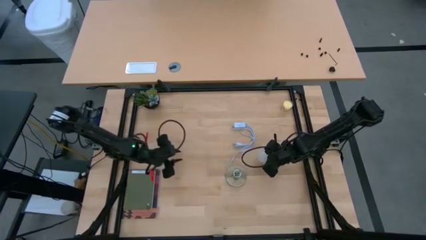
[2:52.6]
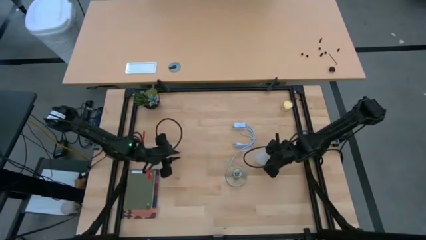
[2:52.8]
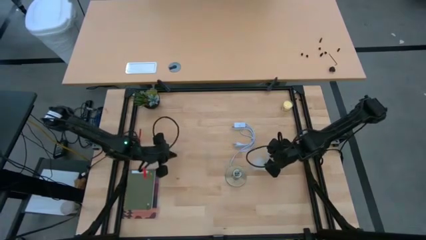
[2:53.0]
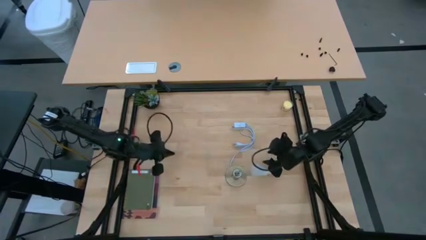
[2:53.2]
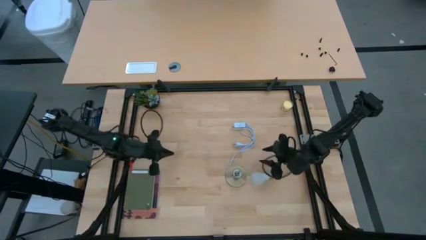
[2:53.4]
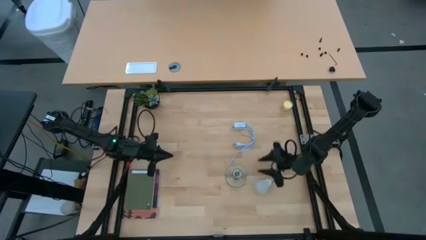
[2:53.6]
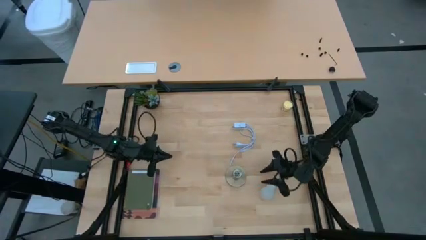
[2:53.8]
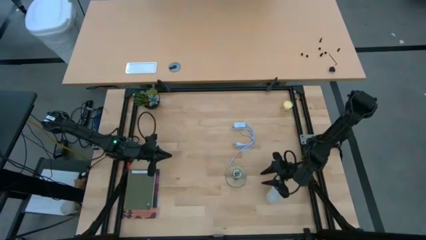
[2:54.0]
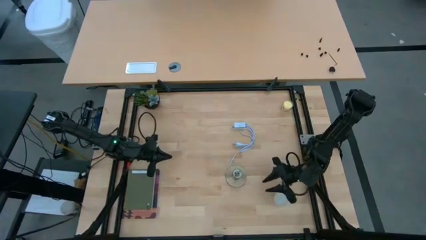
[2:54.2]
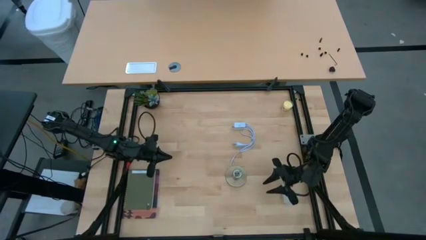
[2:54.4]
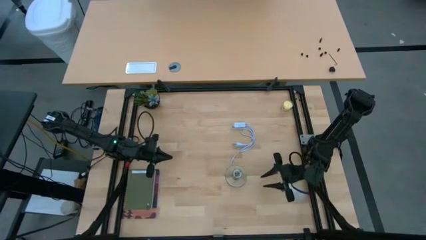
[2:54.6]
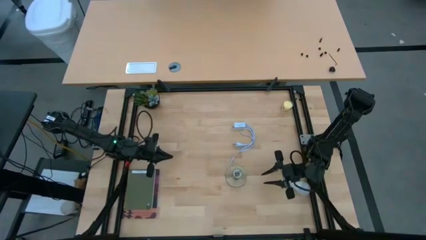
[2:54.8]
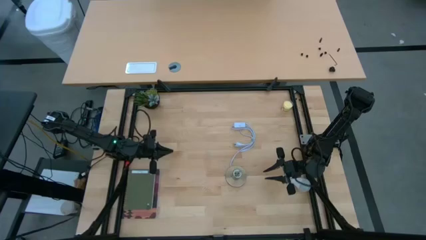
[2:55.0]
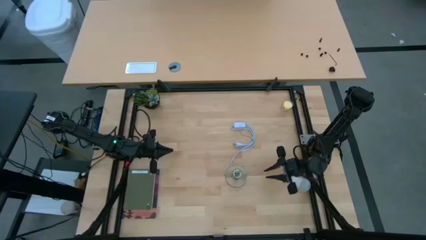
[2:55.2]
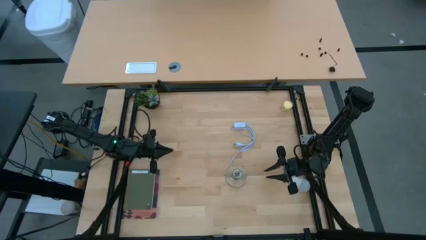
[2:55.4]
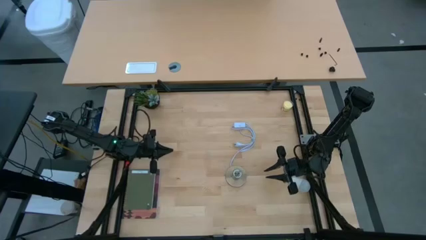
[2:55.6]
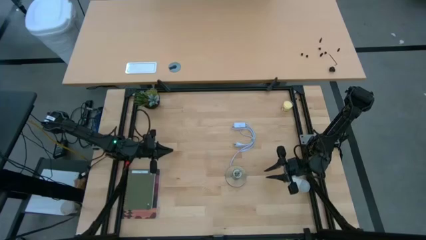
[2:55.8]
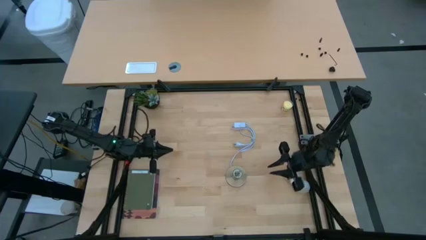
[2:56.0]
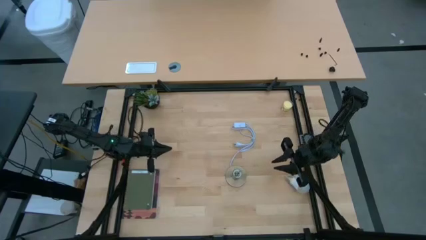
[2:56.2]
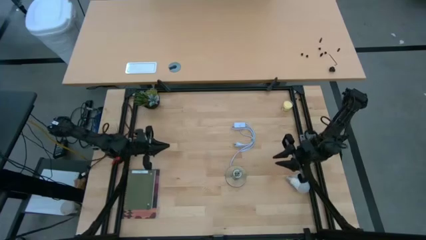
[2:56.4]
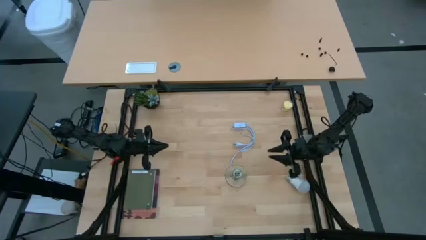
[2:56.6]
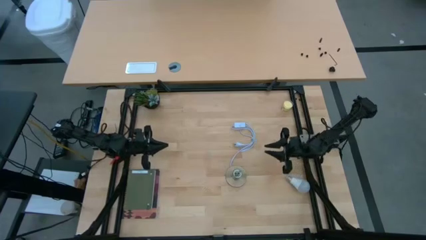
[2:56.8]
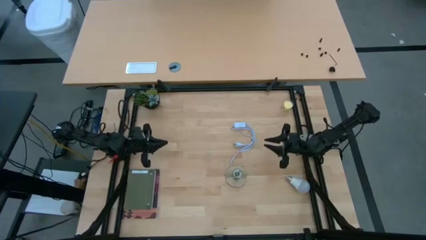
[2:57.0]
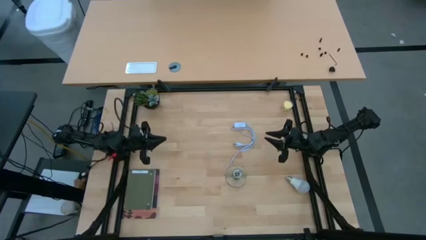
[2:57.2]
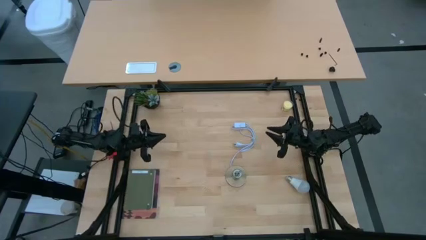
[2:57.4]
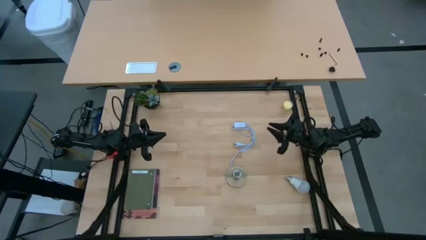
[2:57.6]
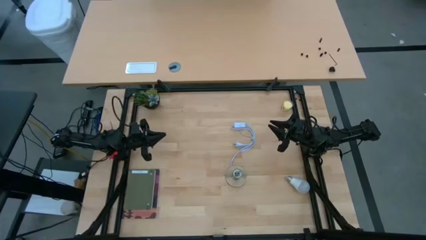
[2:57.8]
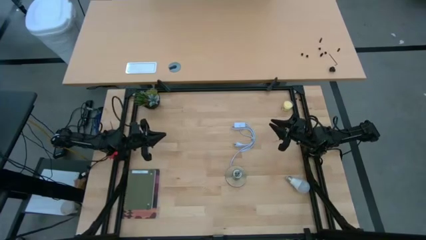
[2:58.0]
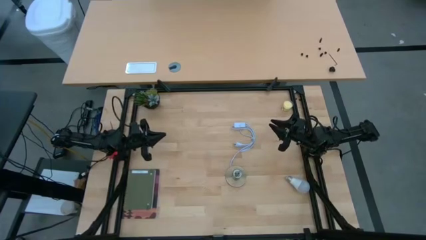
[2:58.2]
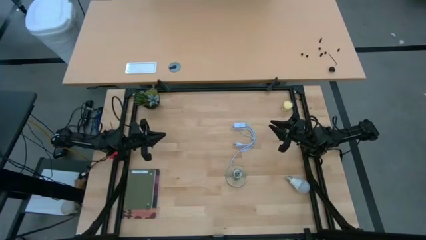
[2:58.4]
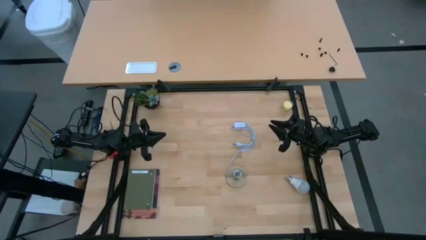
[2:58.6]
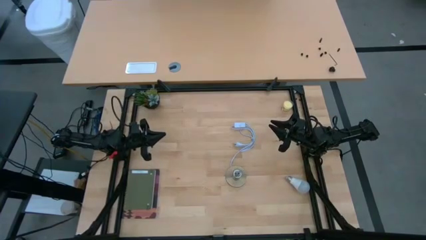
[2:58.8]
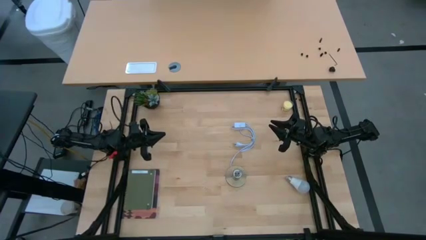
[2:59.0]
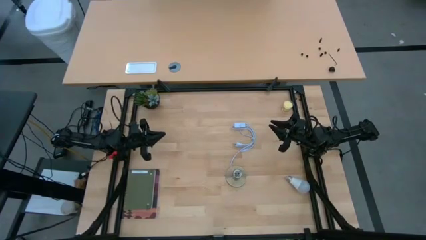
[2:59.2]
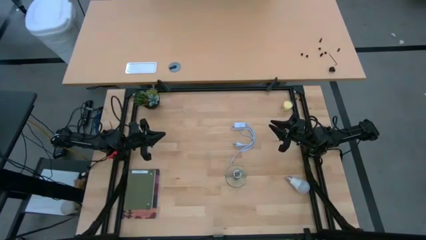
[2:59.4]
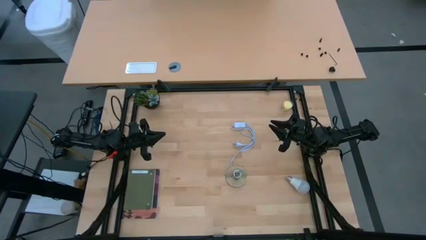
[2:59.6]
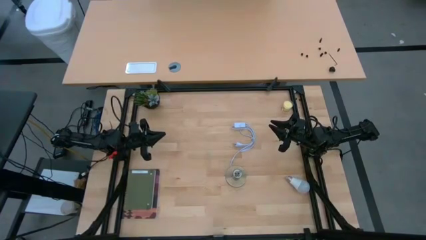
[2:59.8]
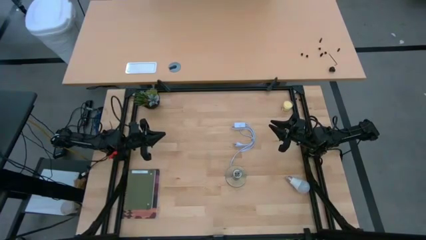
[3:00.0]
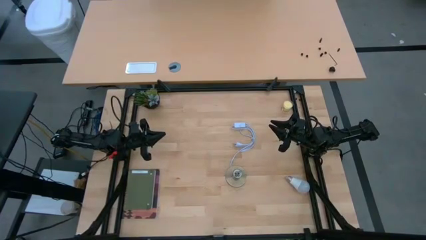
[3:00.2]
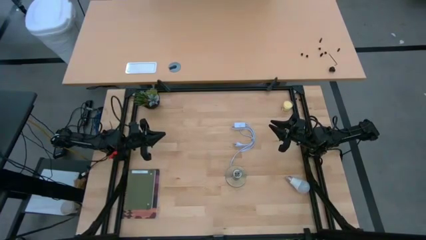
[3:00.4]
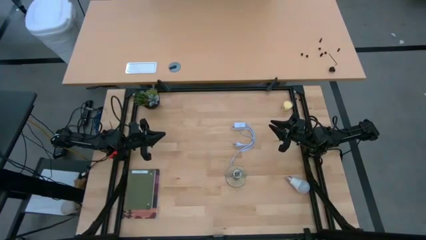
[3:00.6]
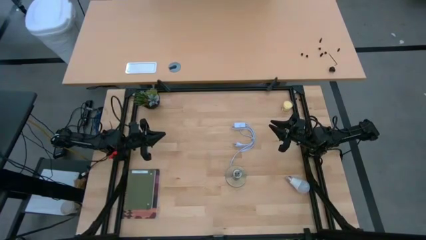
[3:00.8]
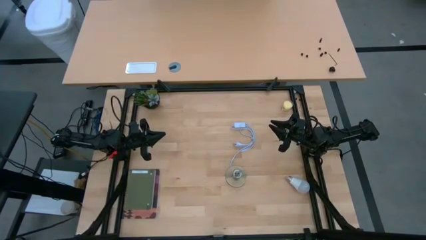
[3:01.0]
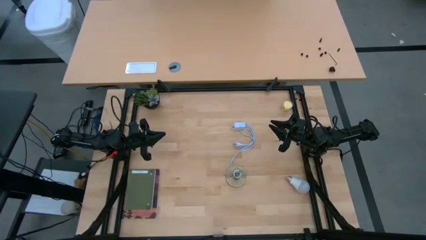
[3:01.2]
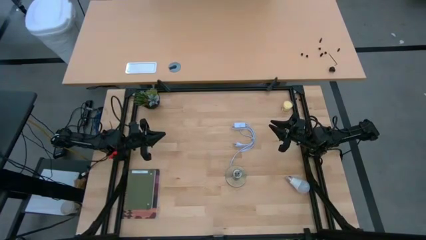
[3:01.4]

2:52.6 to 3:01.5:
Task: Screw lightbulb
Return to Home Position

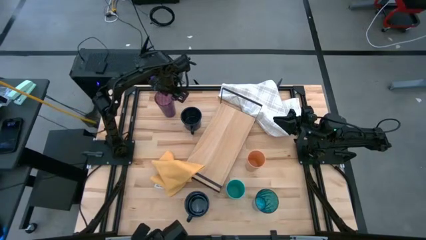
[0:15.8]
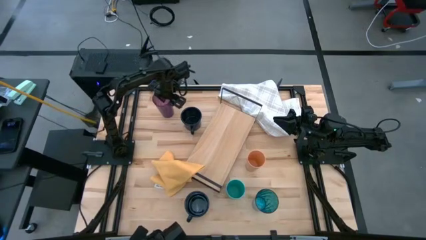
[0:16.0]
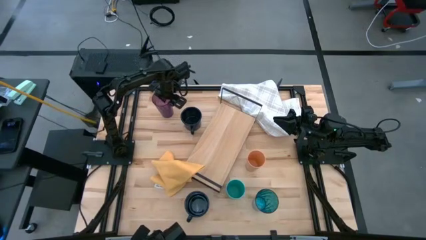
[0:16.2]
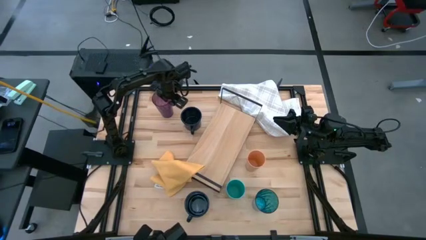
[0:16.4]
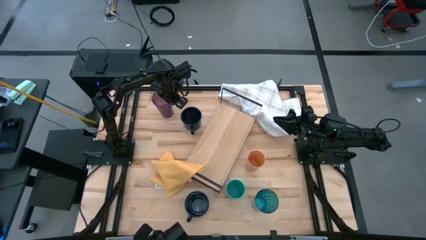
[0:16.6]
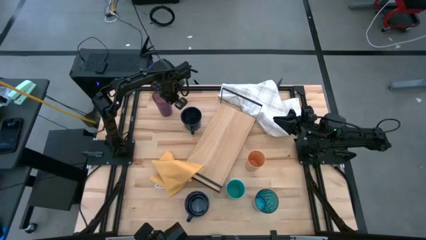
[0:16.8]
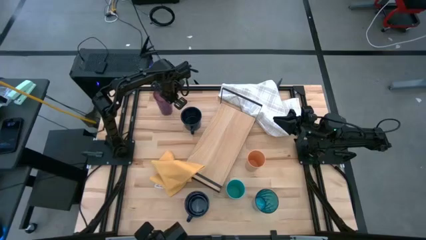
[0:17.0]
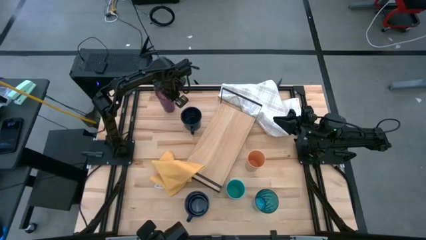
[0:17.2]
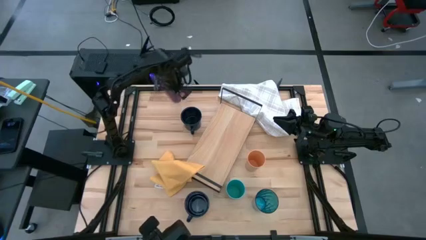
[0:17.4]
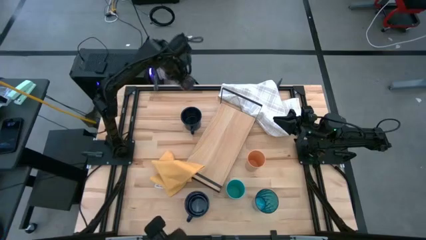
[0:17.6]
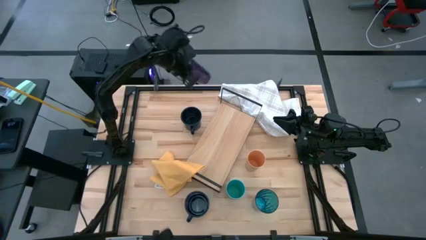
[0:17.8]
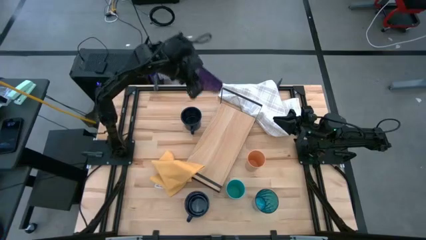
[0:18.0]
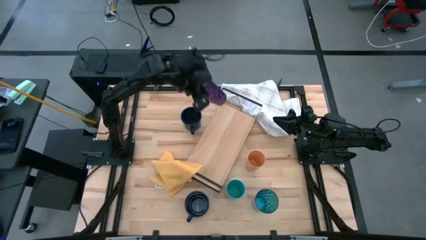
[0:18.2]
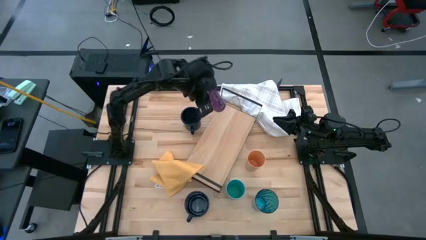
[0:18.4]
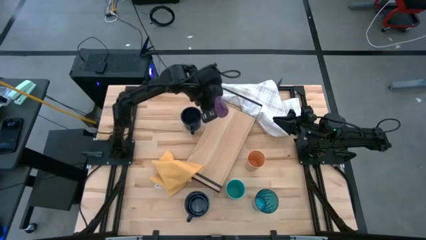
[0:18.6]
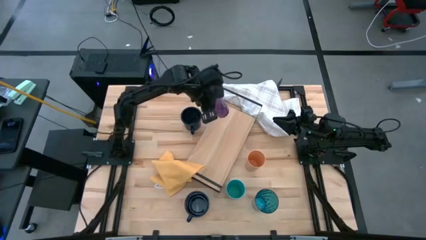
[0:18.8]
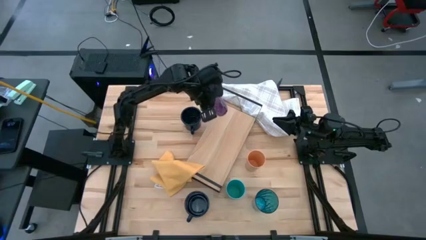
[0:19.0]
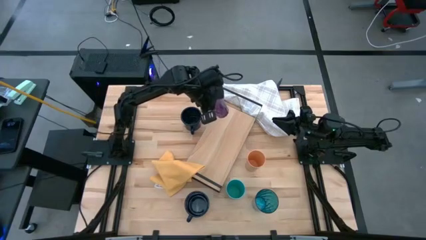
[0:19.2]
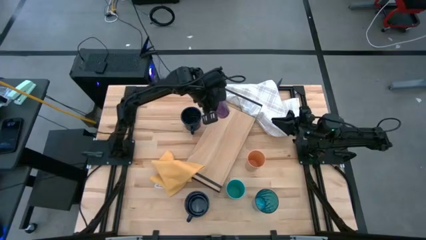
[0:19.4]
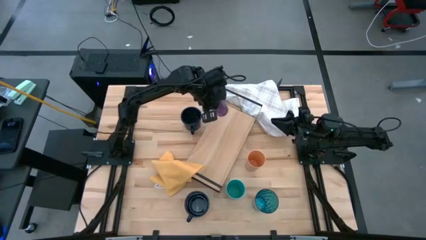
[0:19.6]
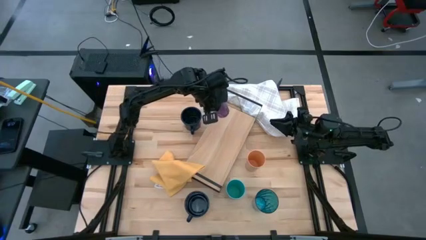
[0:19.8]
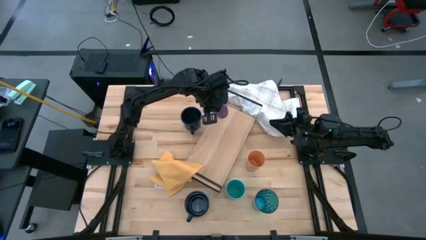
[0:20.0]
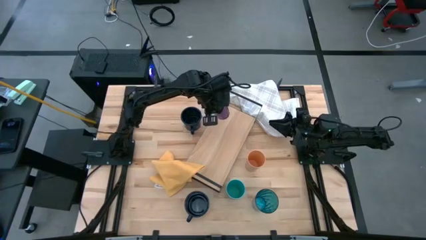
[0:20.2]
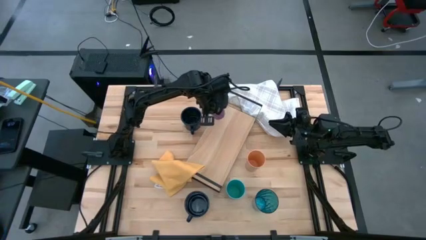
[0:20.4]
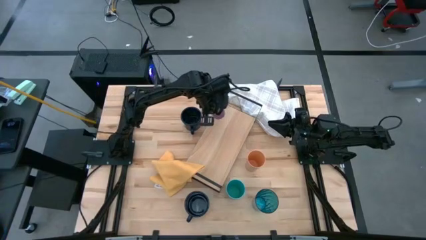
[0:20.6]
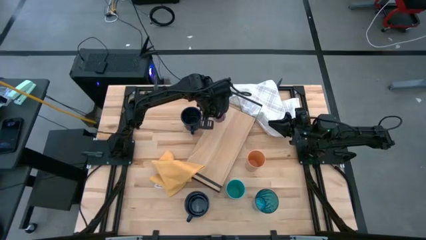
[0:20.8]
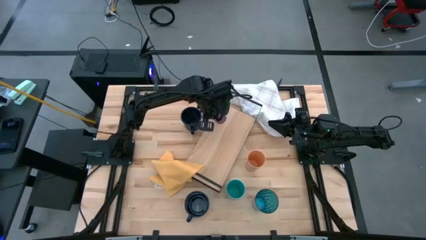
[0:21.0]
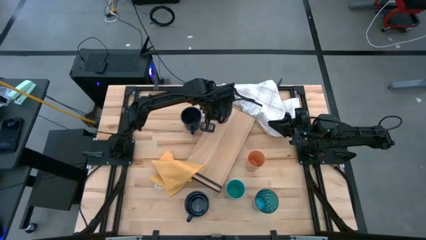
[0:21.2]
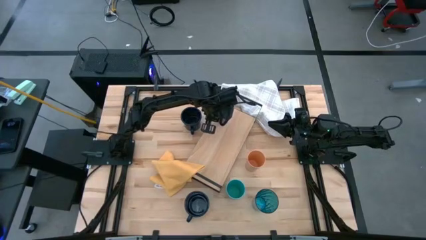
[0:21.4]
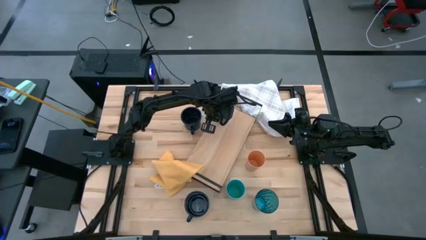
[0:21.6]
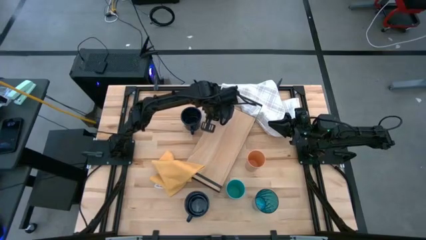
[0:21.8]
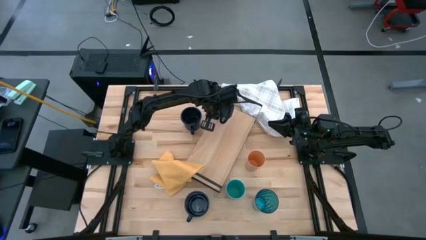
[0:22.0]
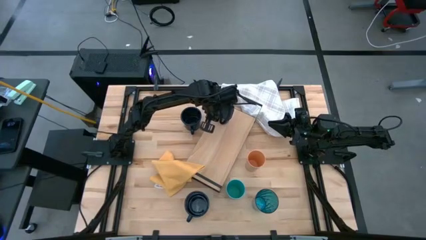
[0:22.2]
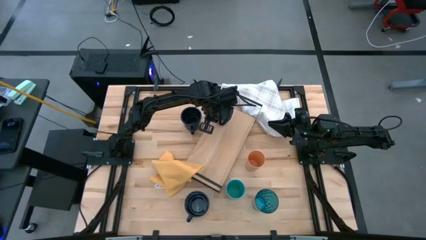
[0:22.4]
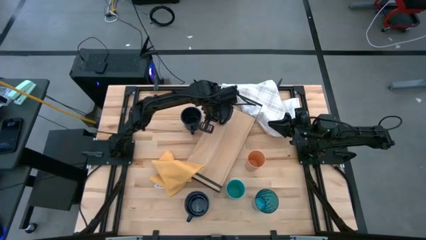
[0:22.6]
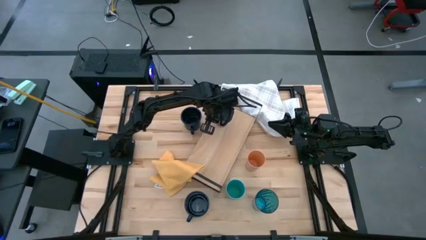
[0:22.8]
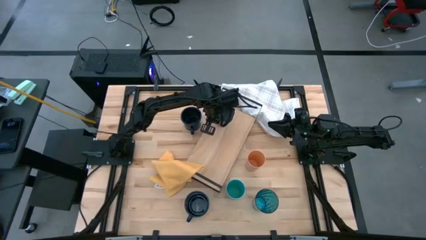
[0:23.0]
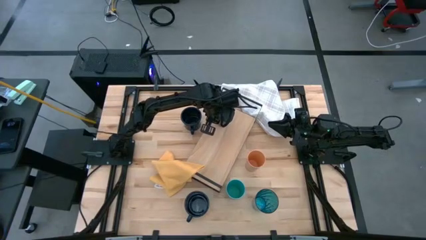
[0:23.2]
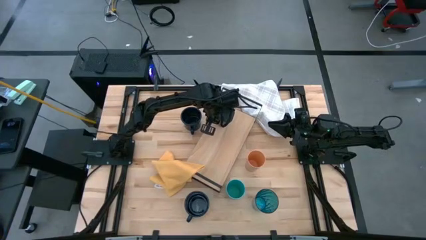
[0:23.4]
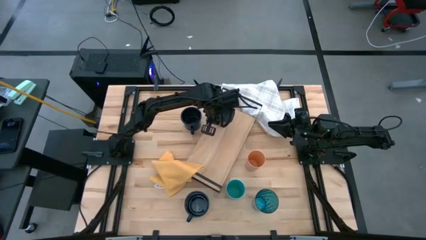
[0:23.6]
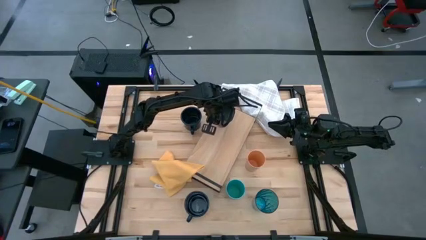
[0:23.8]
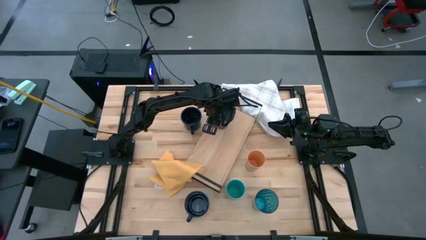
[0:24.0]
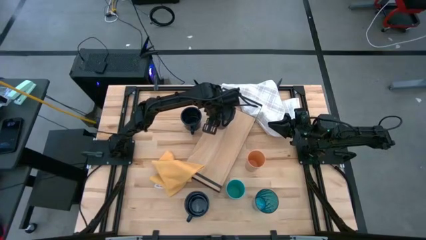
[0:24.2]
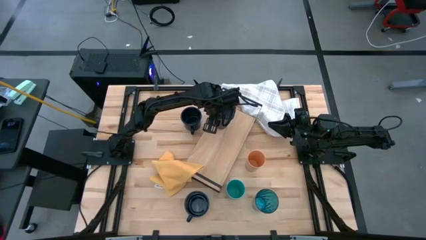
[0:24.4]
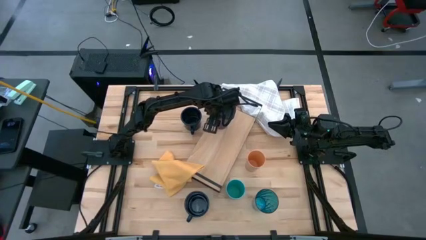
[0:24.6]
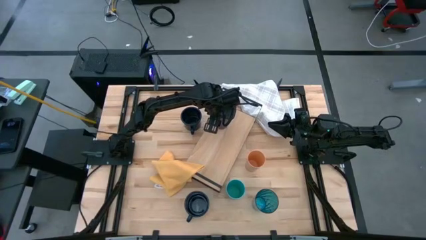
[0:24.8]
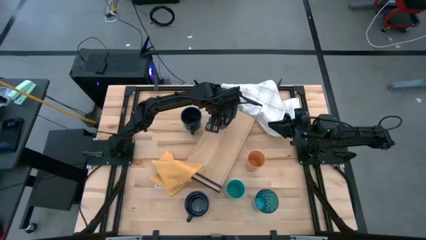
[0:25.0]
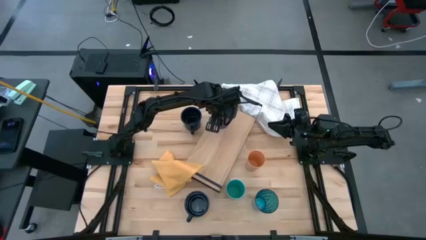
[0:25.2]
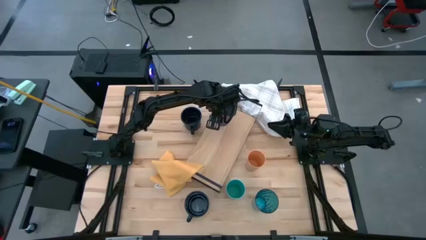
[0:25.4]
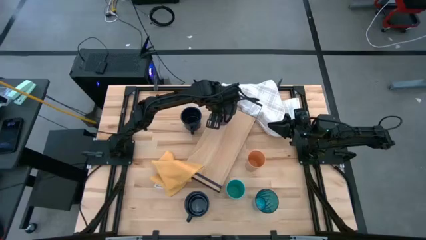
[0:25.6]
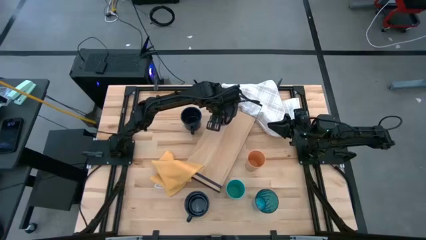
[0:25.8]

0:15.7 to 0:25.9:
Task: Stack small to large cups/mugs on shelf
Put the purple cup on the shelf
